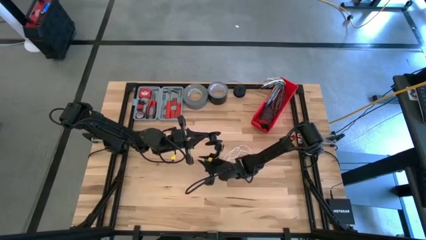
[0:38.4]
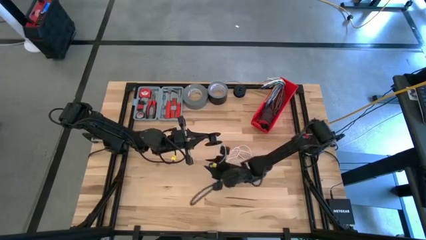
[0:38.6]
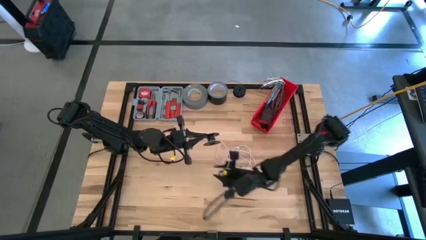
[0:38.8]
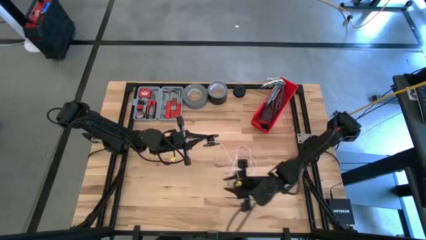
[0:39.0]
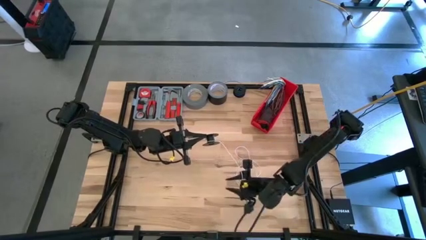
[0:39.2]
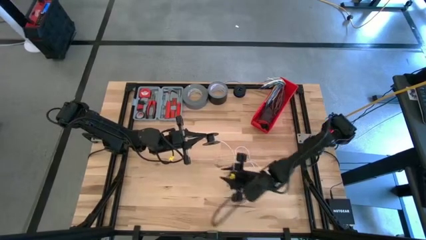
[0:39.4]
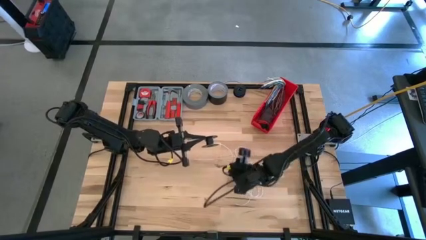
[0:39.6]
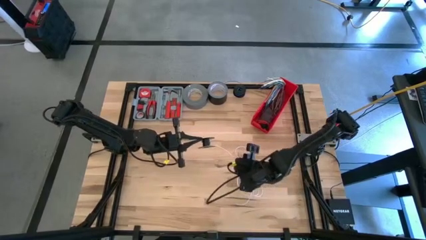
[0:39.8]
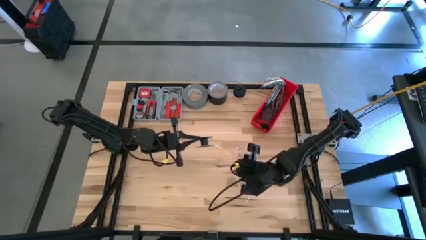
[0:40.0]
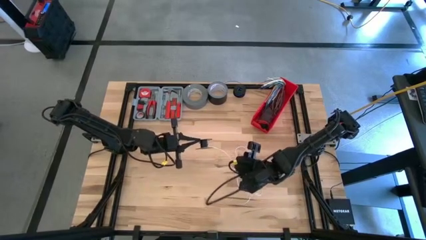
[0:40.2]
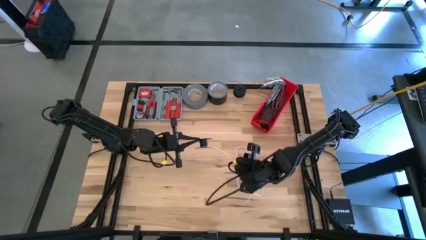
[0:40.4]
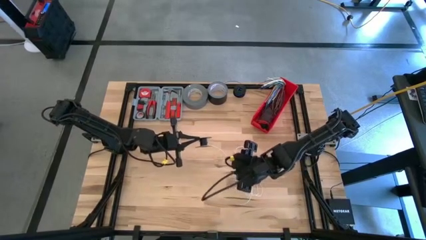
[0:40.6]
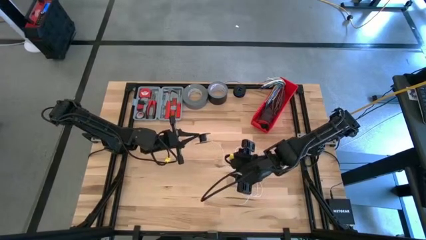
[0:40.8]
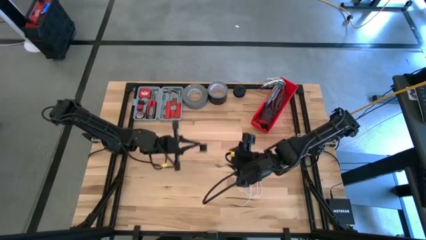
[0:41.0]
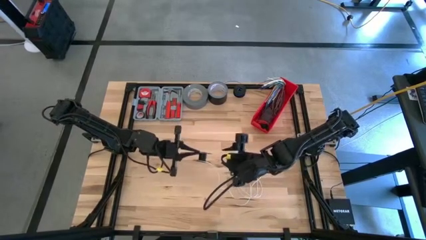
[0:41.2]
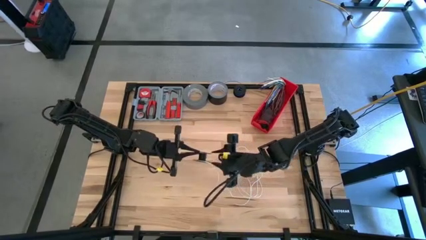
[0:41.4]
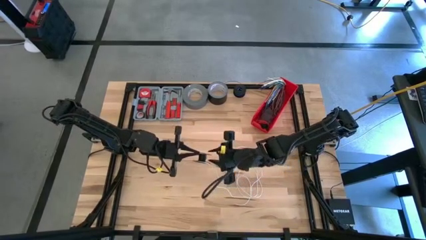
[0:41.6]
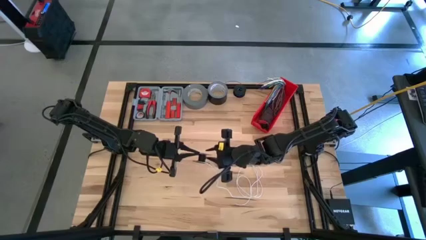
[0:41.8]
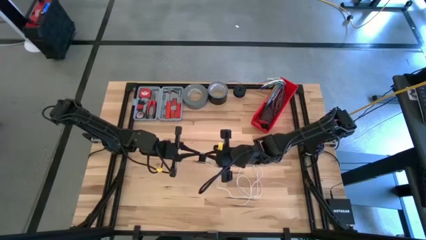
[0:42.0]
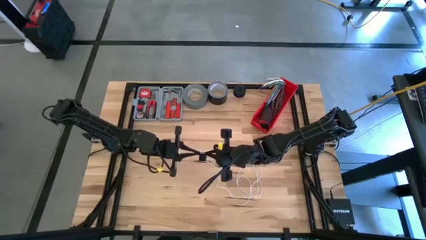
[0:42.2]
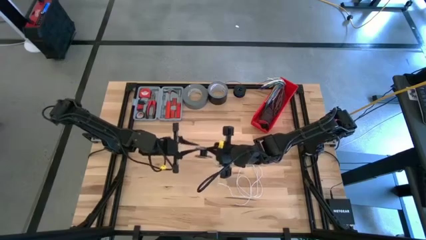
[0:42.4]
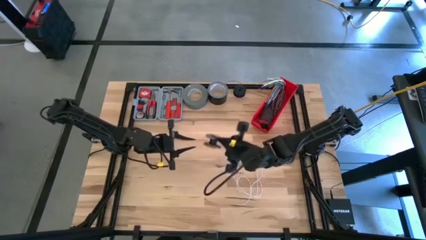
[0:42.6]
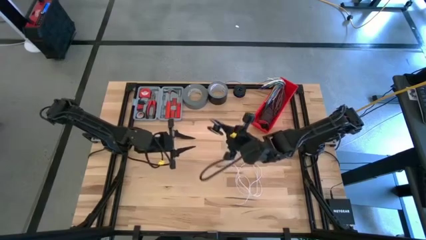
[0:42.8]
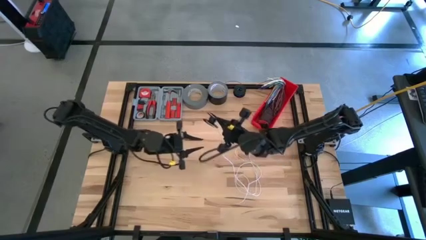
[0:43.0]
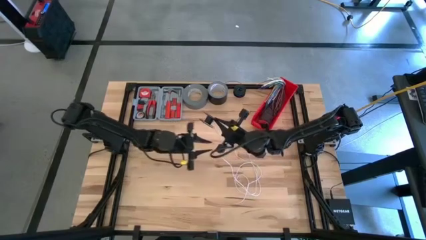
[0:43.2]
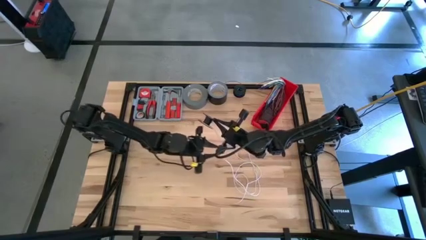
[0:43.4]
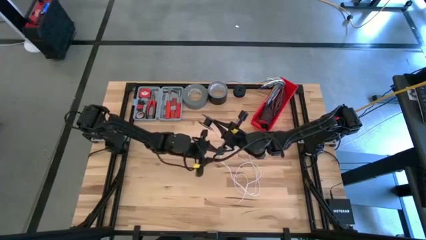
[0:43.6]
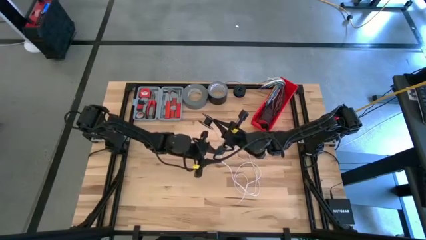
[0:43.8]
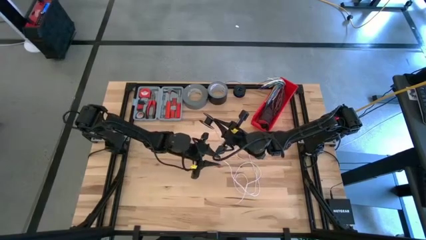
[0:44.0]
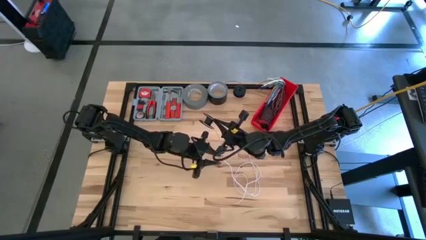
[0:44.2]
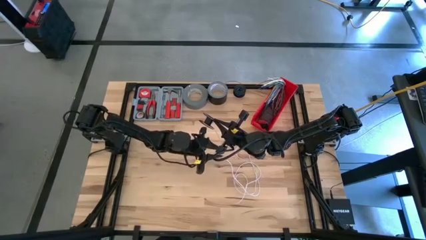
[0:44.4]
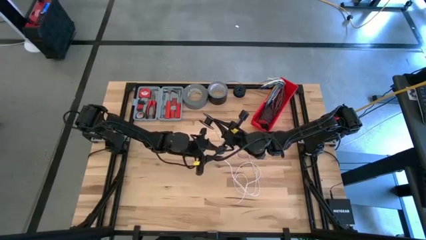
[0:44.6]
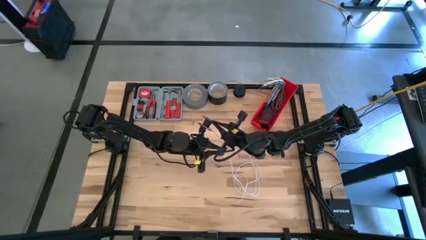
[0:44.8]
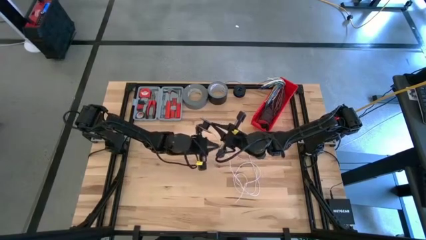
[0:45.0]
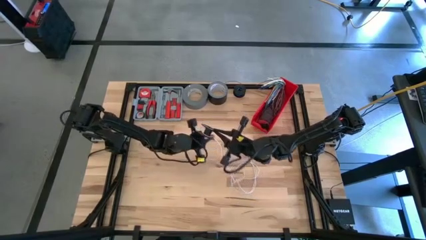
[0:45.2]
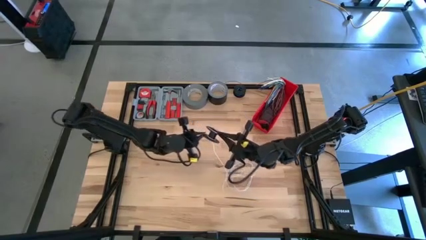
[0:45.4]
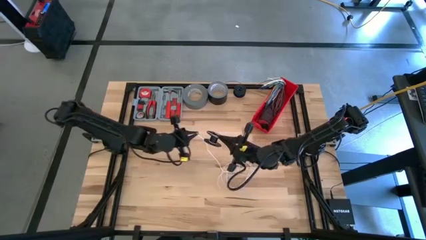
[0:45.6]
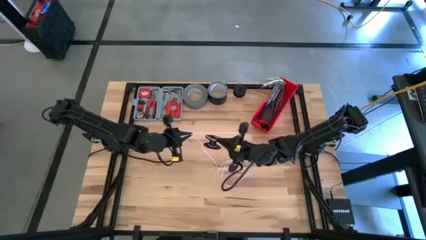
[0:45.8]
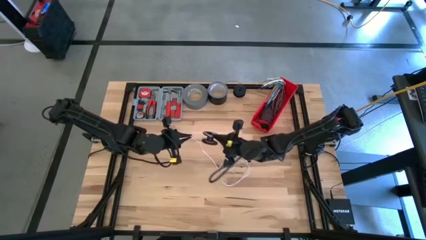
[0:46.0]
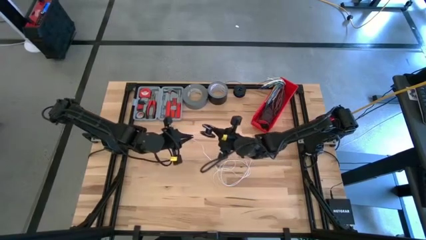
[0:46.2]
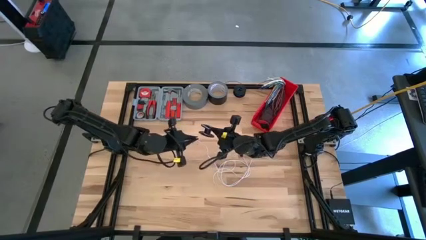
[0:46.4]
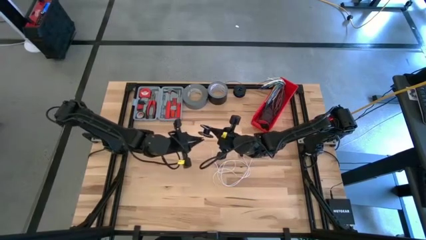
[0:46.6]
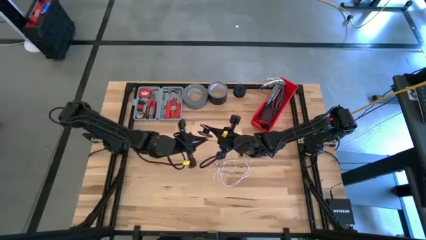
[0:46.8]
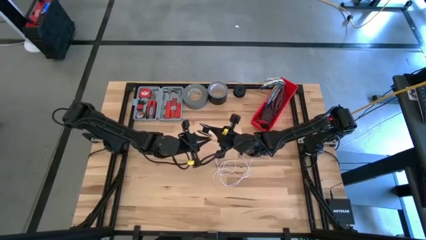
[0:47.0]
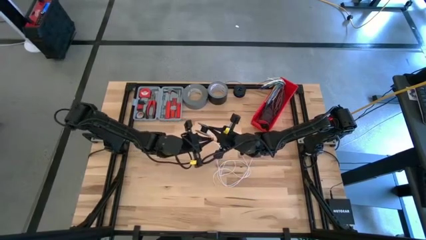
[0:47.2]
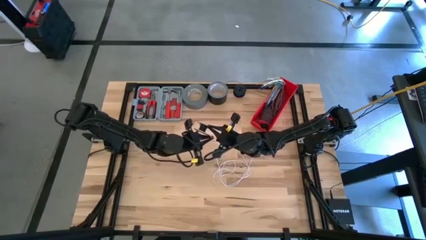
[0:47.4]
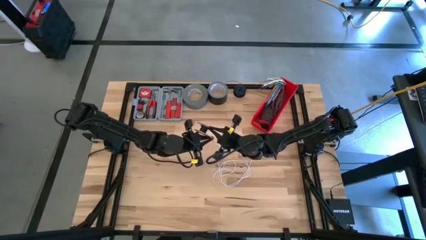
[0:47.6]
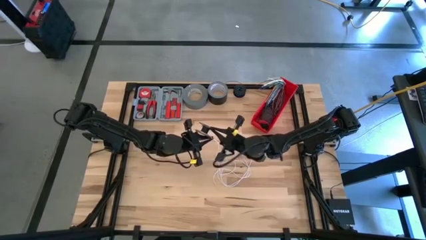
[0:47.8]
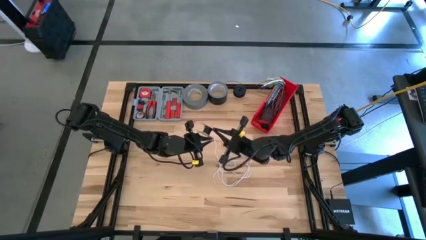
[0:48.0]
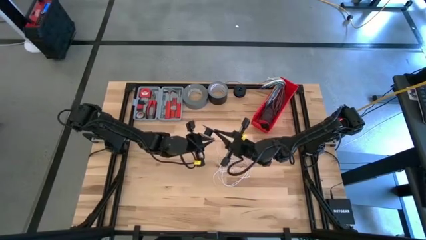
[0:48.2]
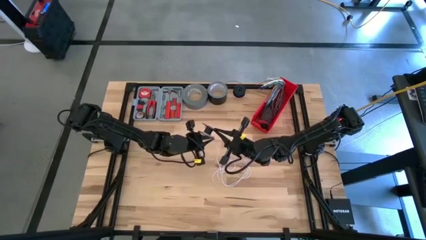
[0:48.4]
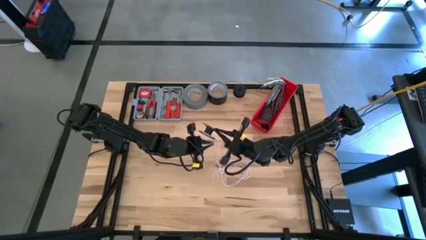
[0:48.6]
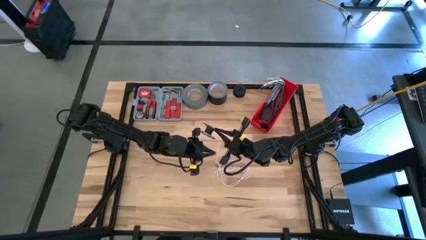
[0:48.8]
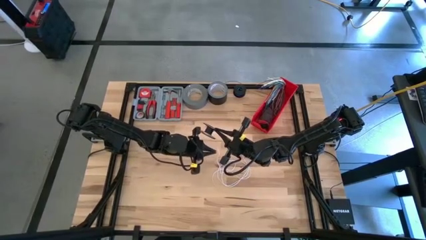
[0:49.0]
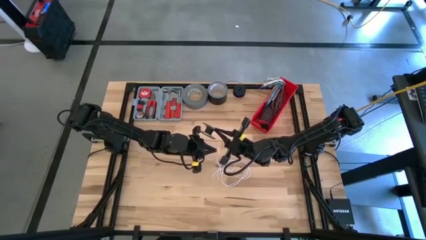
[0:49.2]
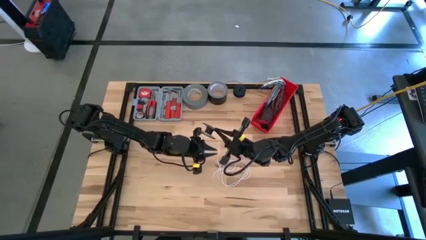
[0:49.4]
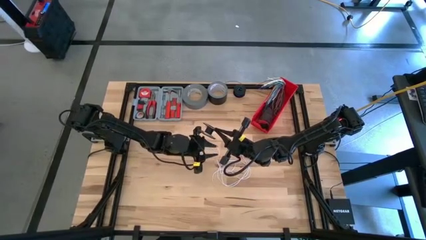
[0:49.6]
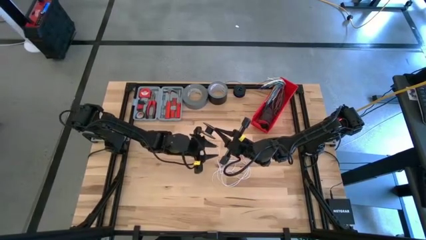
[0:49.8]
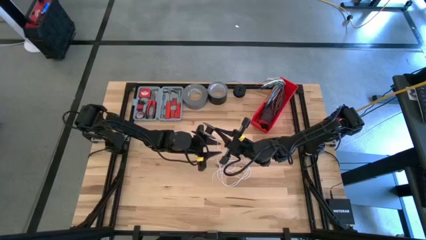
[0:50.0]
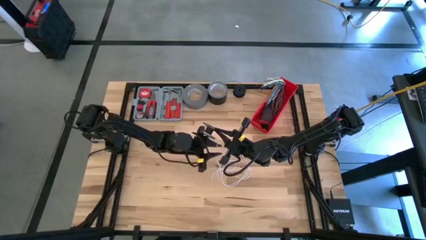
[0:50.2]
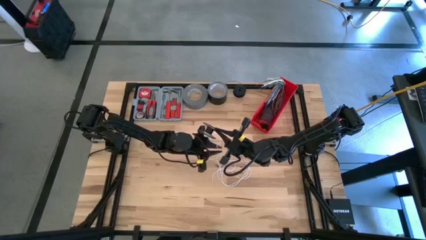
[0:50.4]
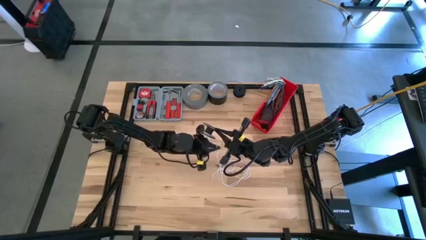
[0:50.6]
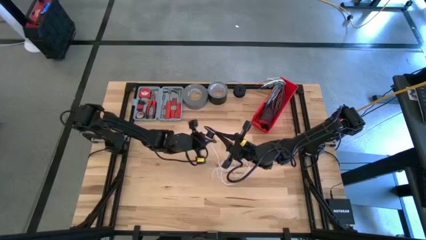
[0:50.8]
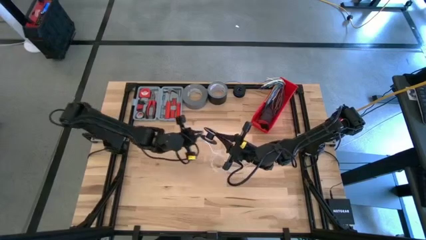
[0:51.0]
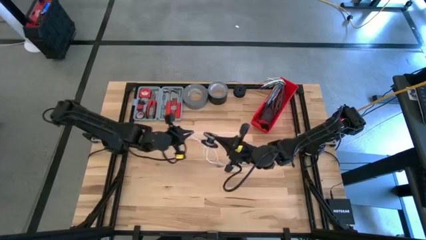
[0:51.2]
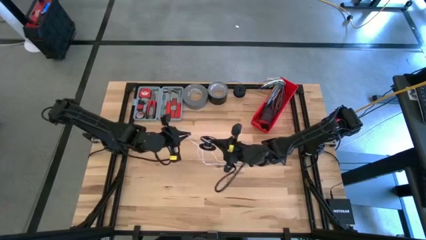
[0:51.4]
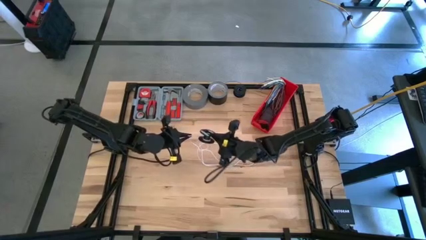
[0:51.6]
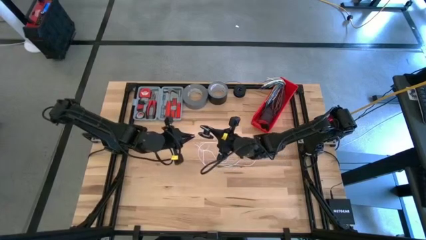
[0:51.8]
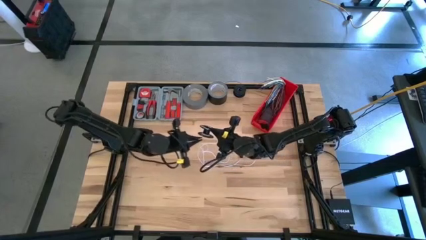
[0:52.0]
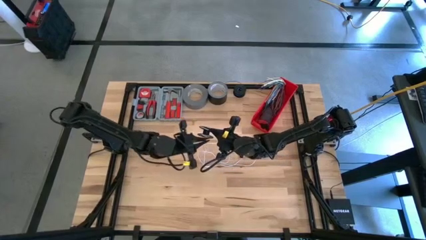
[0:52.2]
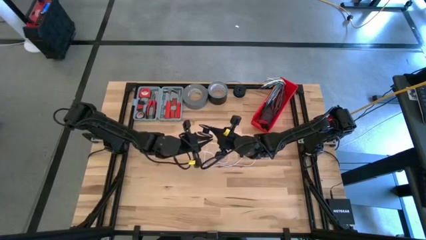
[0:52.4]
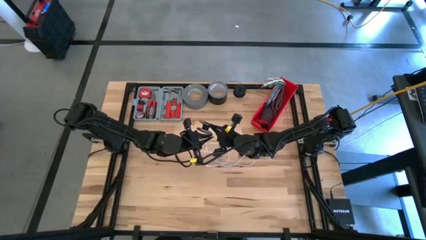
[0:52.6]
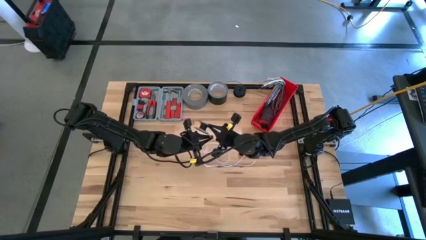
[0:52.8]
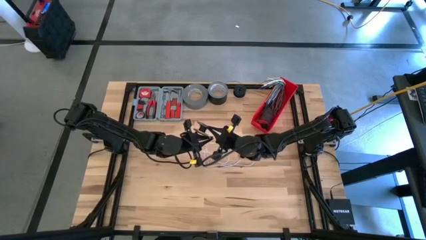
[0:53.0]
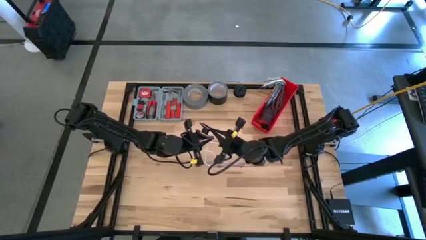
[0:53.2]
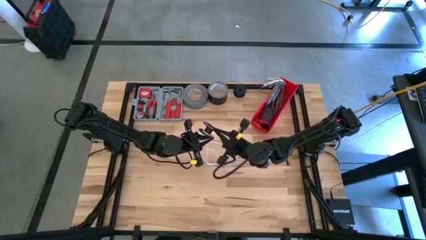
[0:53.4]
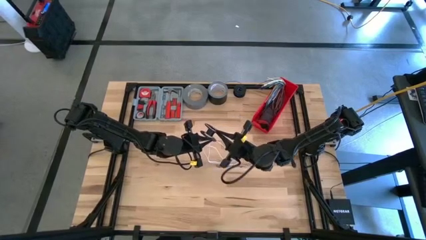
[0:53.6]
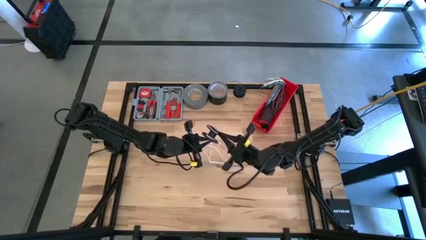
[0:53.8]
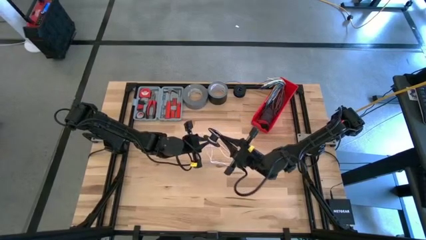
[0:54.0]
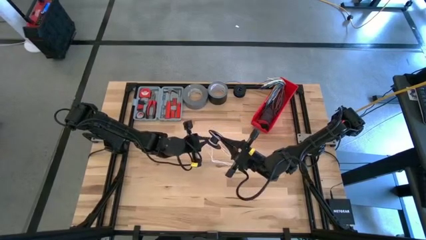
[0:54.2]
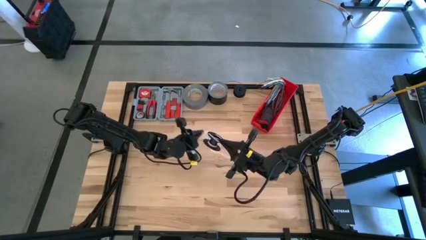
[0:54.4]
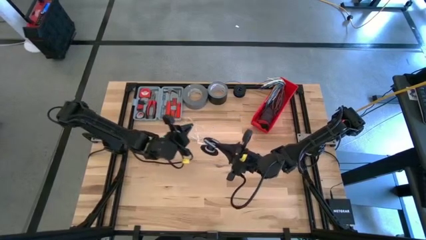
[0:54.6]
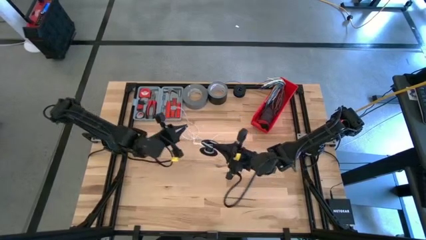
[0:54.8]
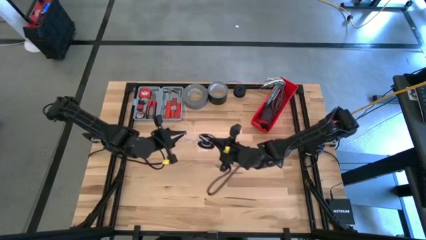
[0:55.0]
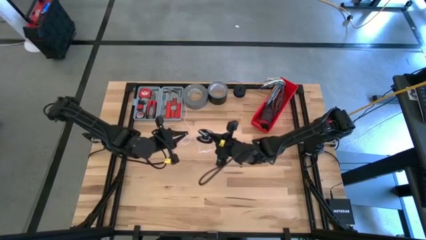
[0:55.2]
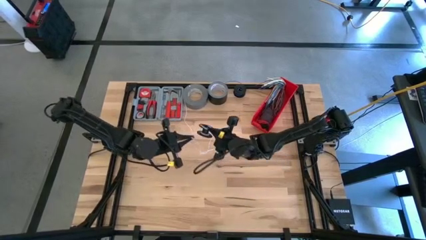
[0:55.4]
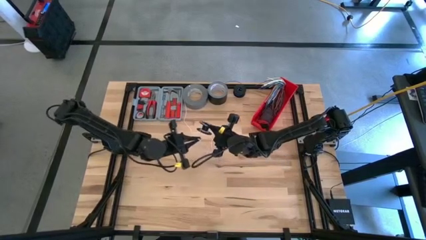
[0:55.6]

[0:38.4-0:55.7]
Task: Coil cords
Coil the white wire onto the black spool
